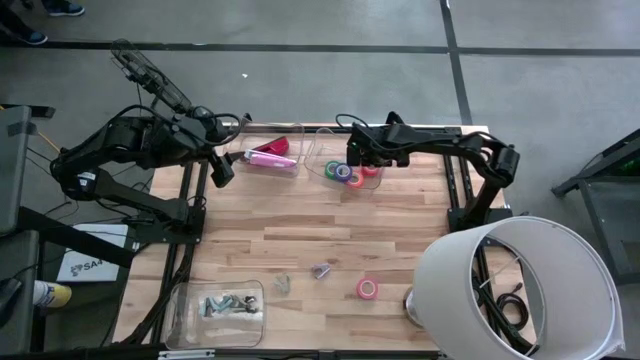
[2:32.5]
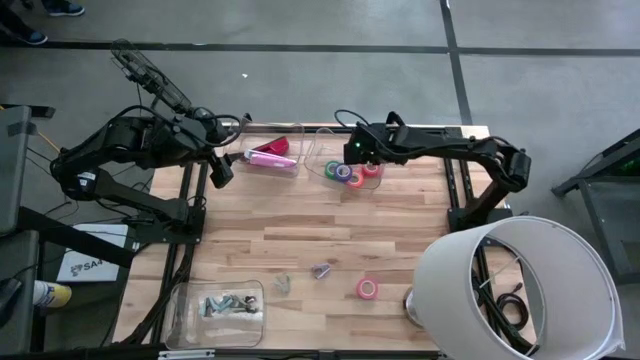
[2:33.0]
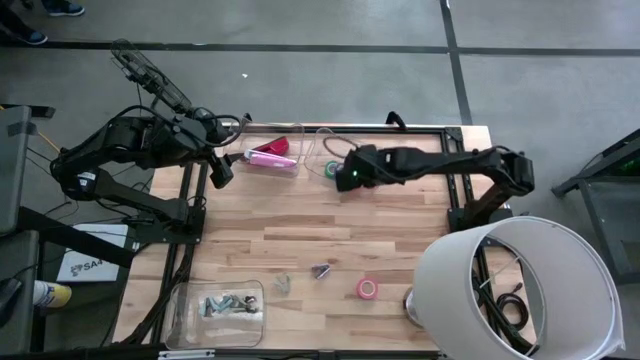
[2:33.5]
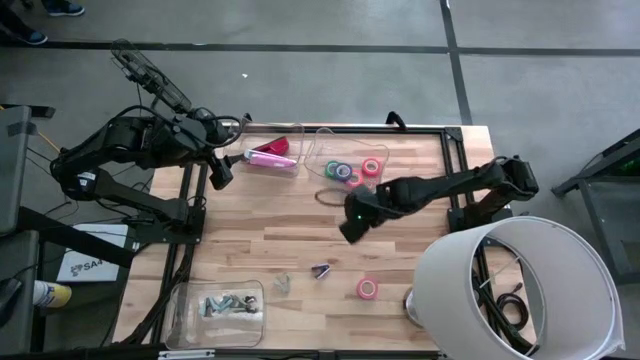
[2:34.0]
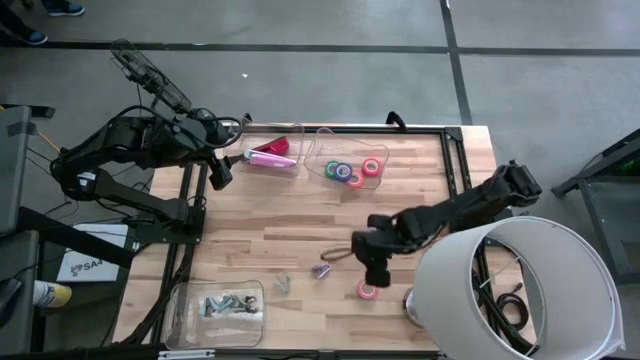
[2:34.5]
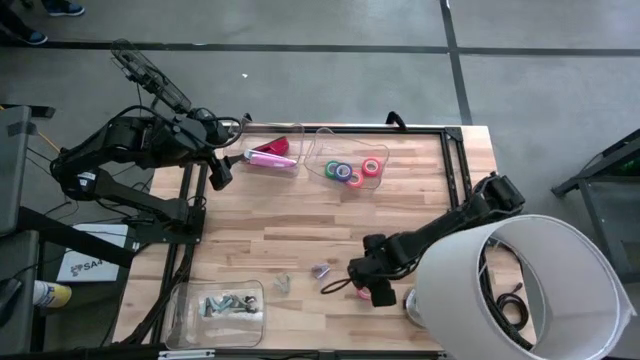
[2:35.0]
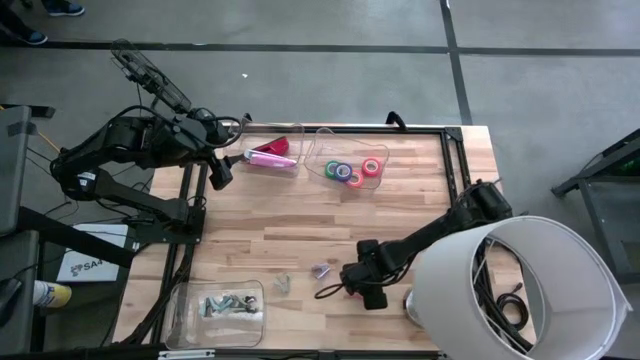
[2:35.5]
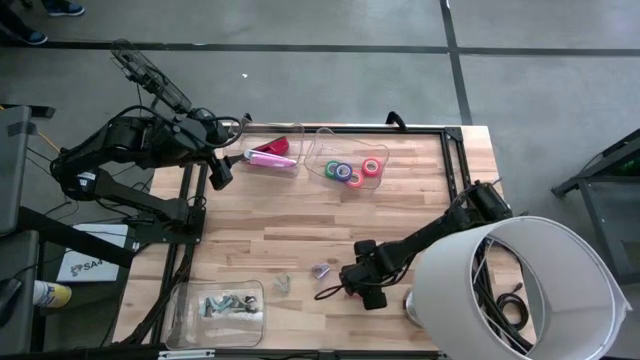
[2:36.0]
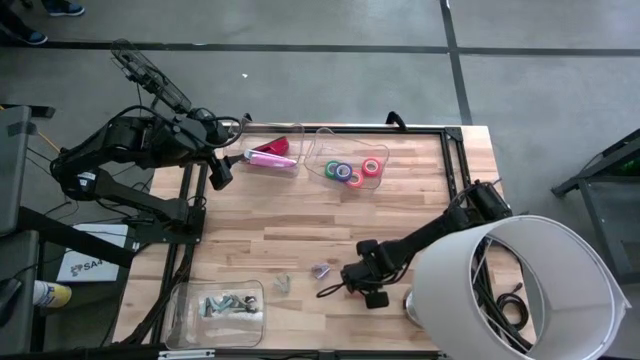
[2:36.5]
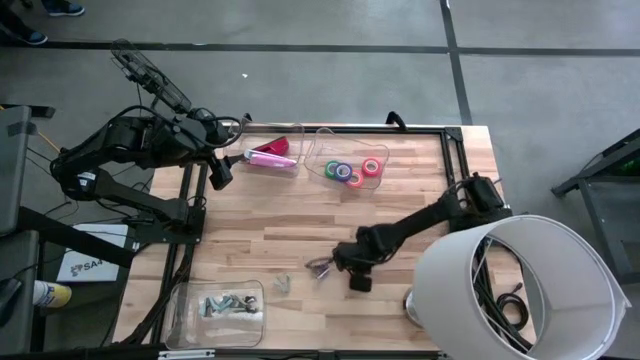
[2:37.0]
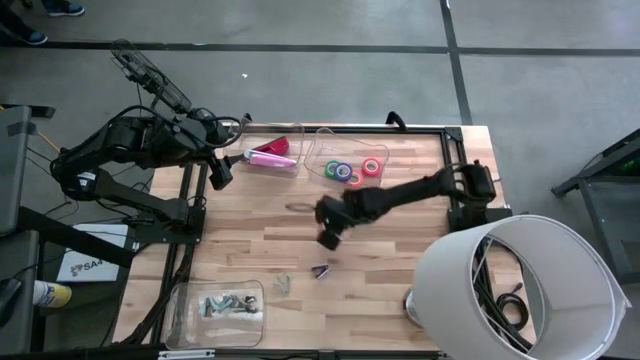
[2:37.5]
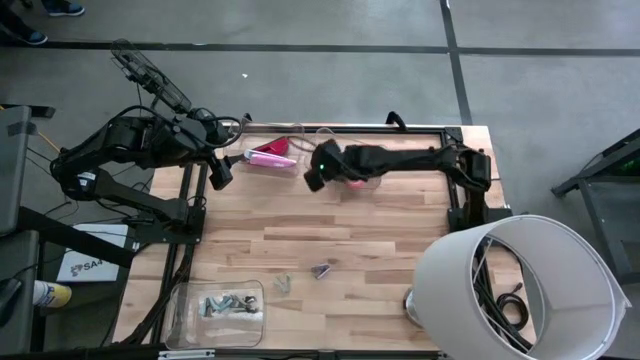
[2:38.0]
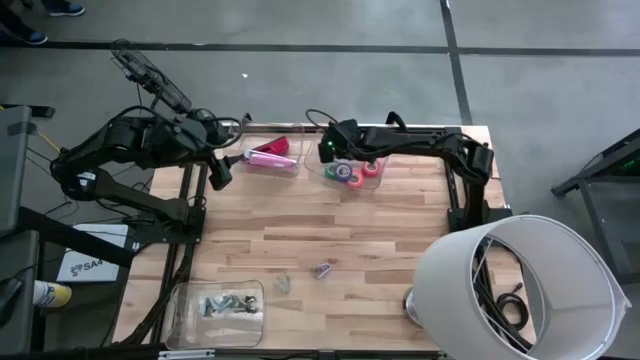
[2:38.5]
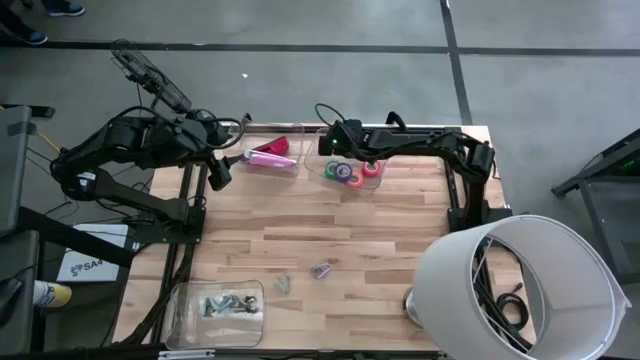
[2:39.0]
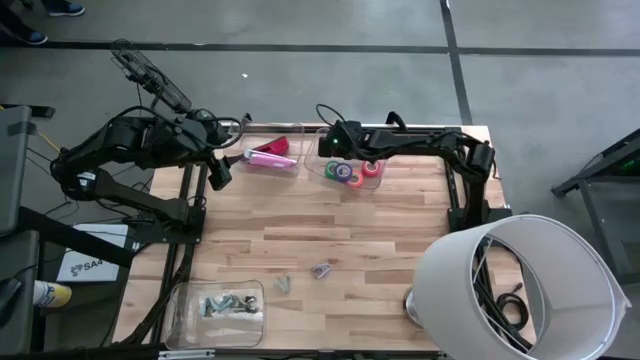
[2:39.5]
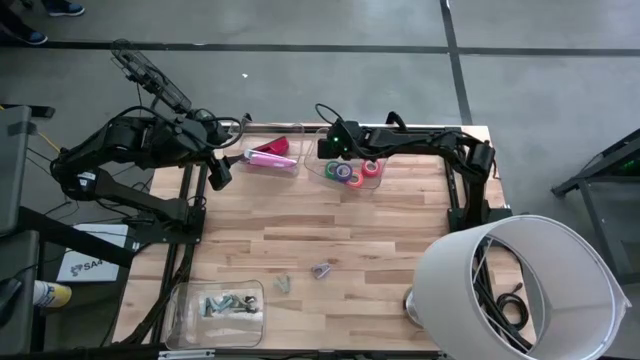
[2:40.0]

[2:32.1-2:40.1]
Task: Pick and place Stapler, Stapler remover, tape
Put the pink tape into the top right transparent bin

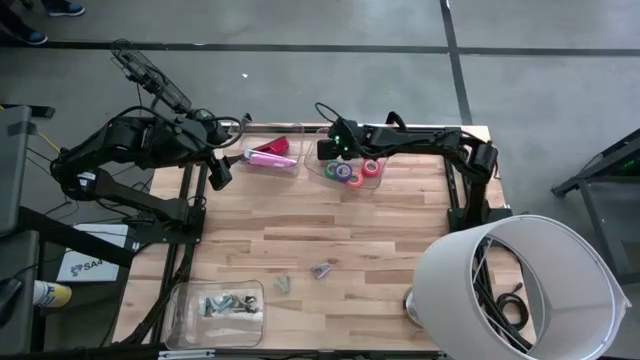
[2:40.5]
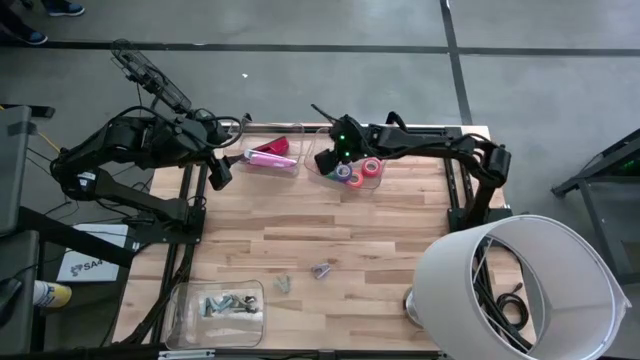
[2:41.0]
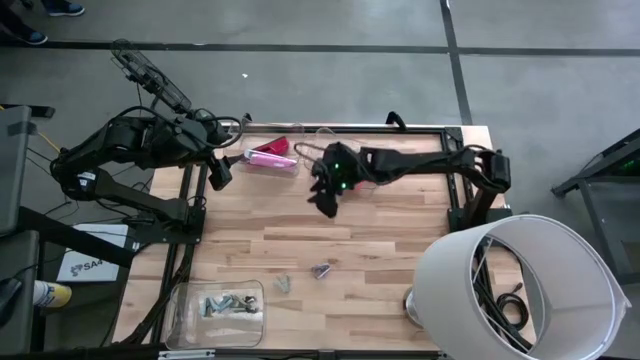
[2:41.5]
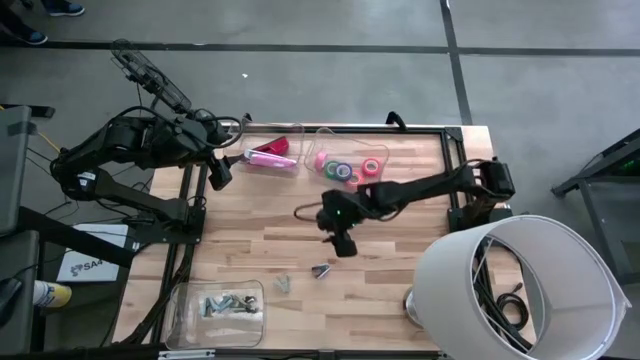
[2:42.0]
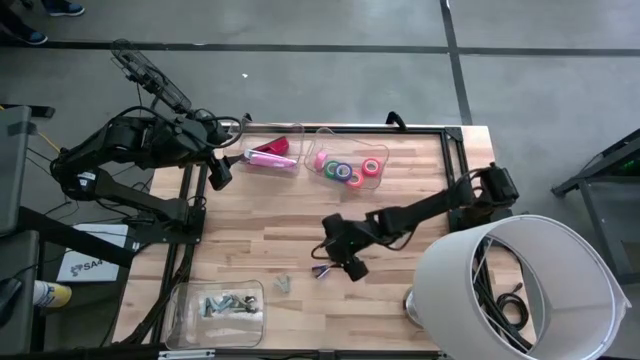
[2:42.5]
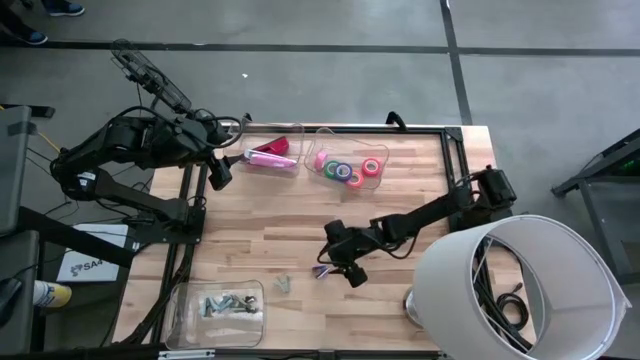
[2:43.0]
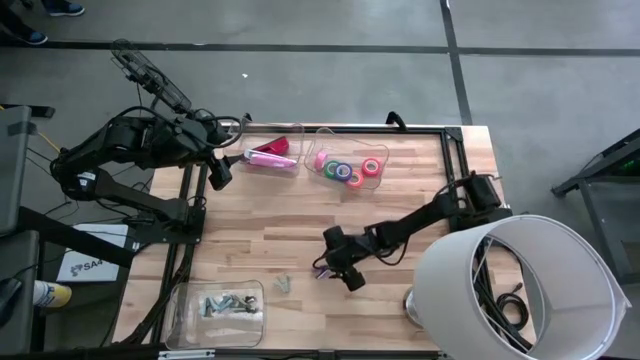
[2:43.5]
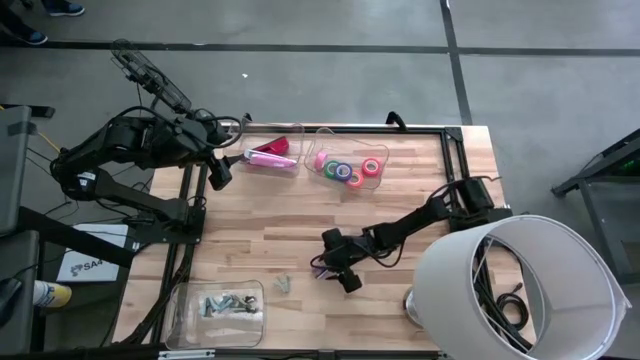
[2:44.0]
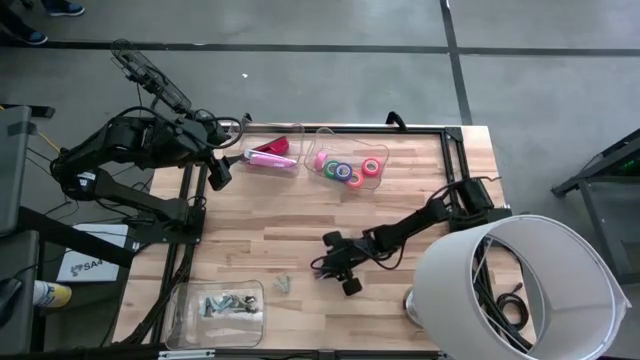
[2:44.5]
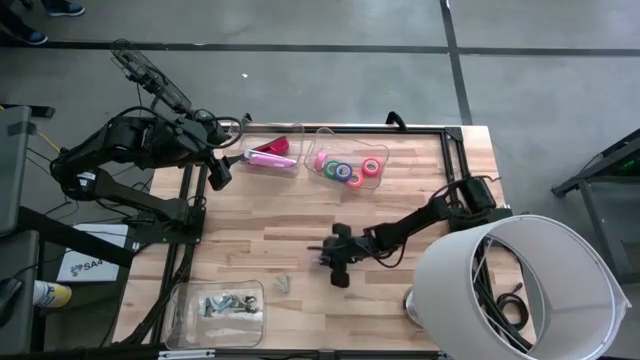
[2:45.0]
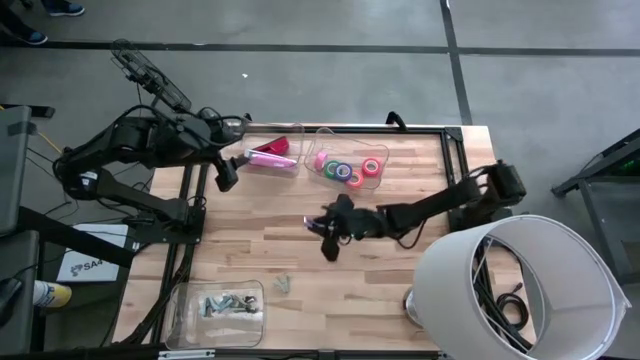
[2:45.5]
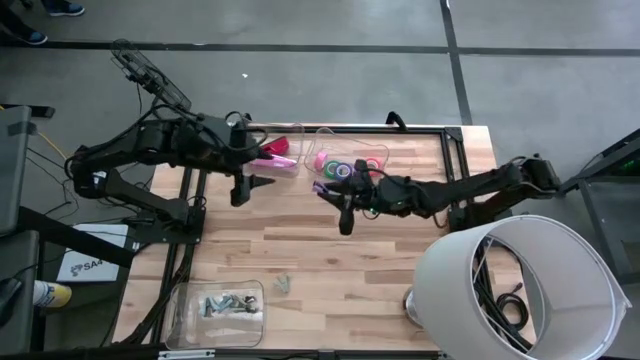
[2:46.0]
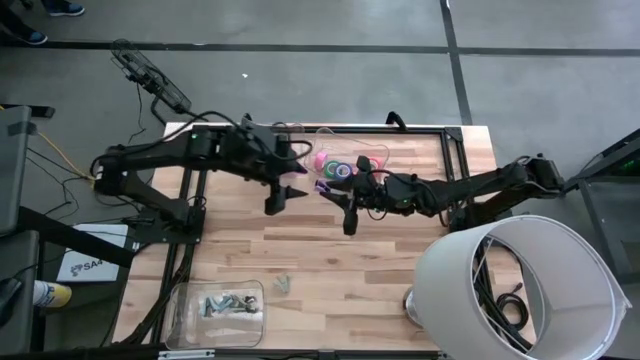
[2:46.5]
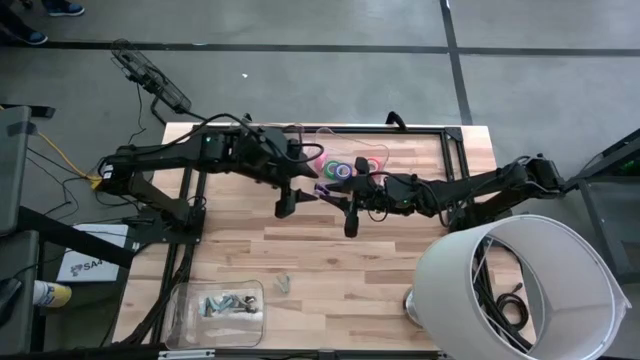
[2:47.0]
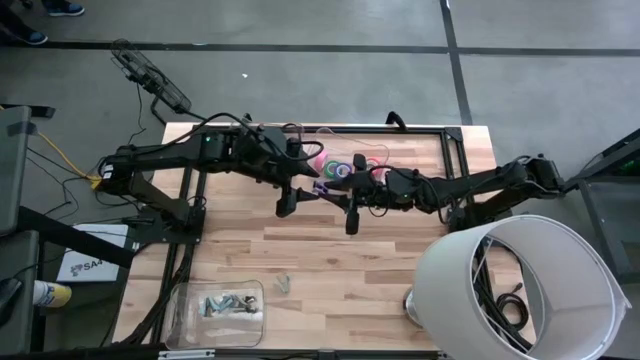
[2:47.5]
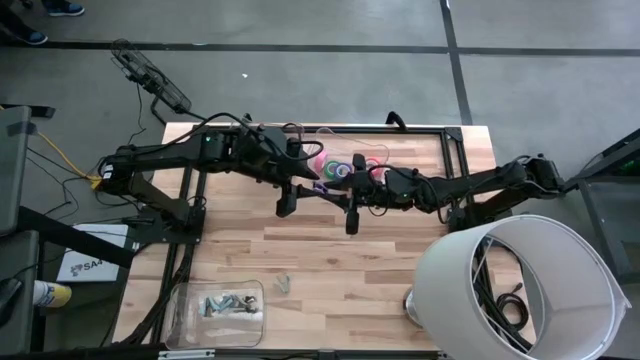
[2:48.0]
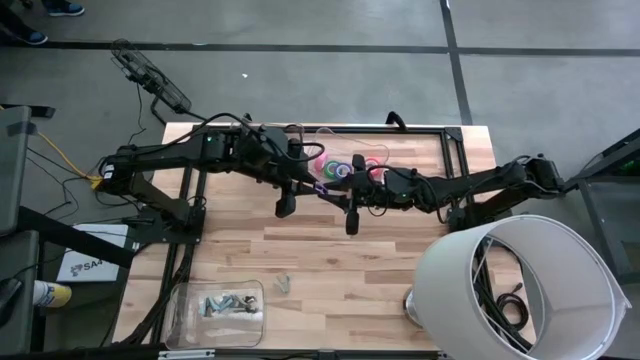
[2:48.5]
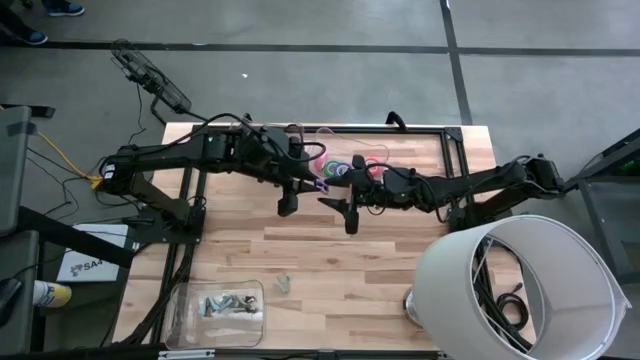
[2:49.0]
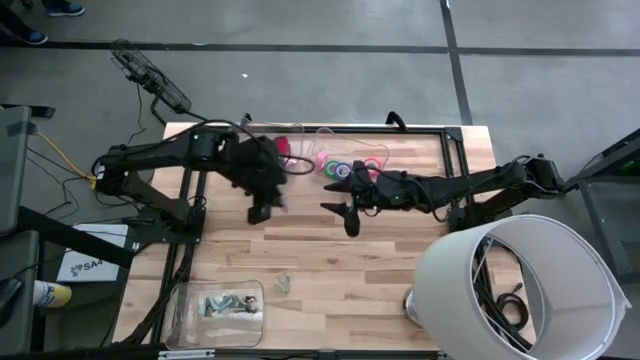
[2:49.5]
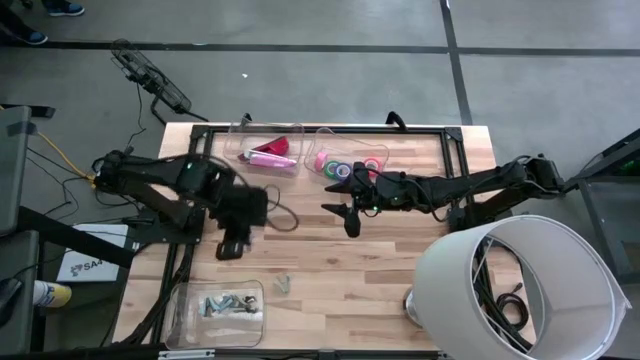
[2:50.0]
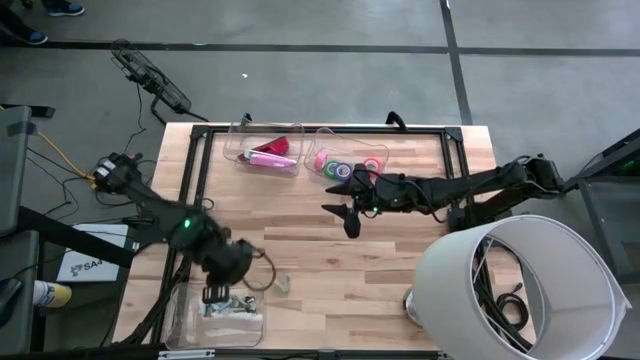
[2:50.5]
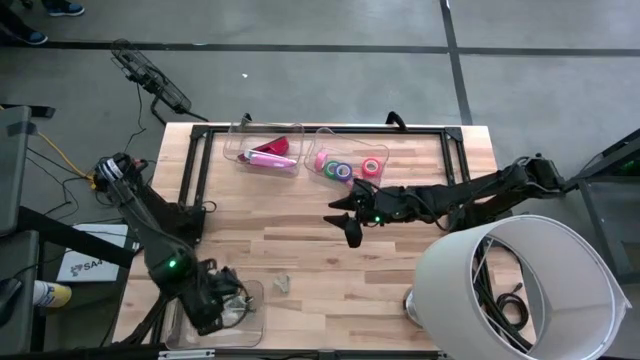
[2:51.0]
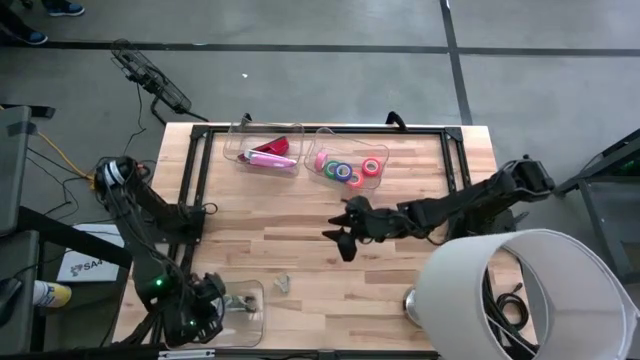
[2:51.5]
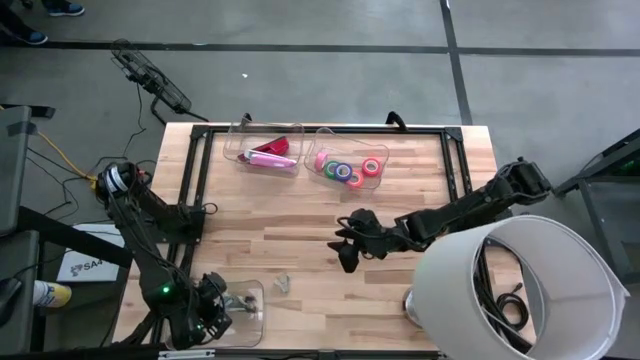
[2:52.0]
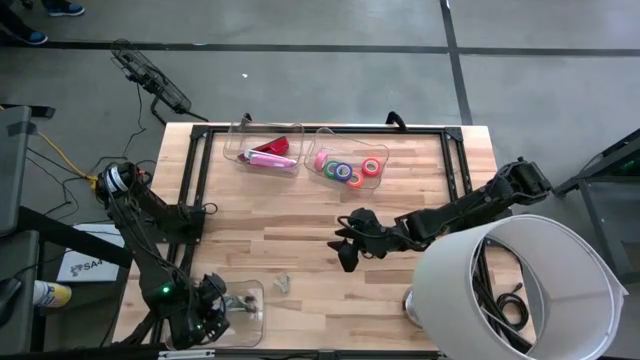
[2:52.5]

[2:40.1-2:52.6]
Put the purple stapler remover into the bottom transparent bin

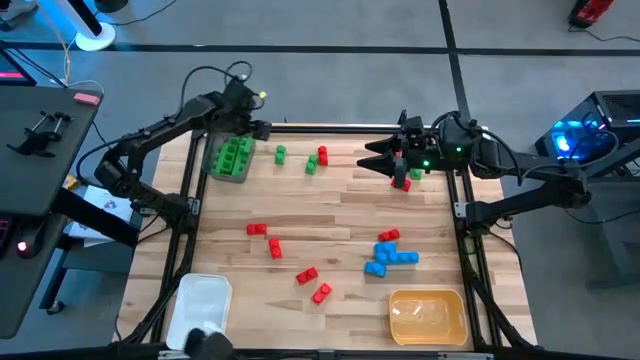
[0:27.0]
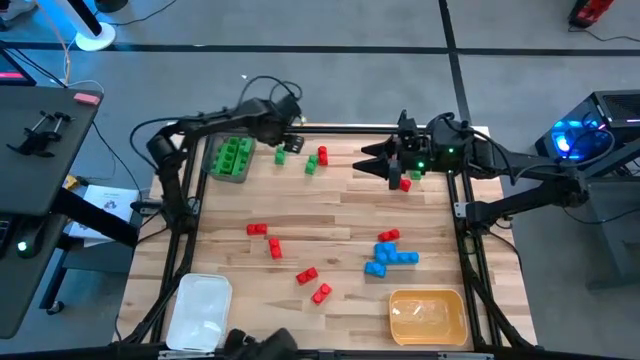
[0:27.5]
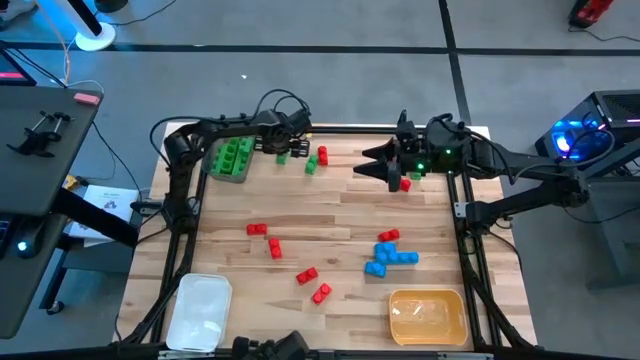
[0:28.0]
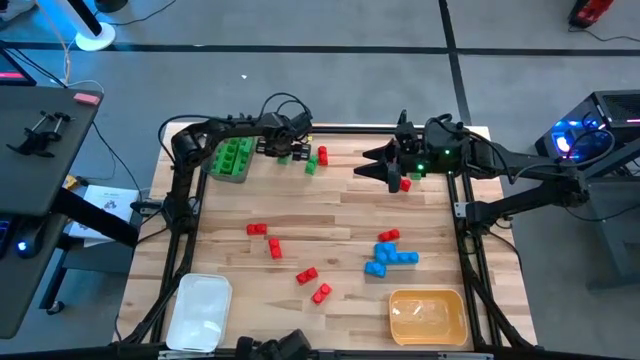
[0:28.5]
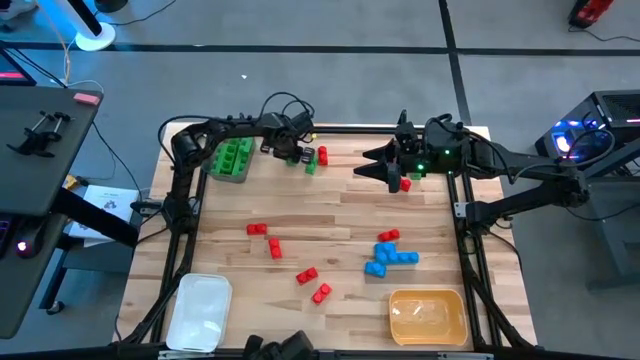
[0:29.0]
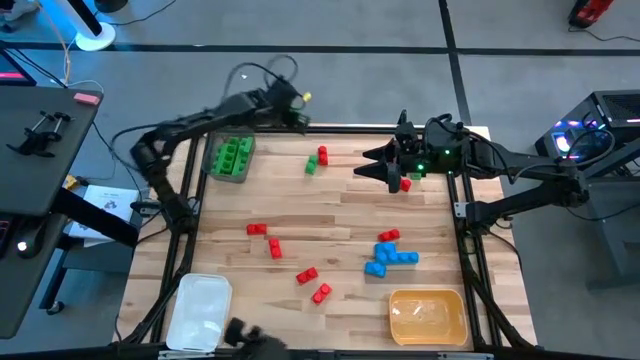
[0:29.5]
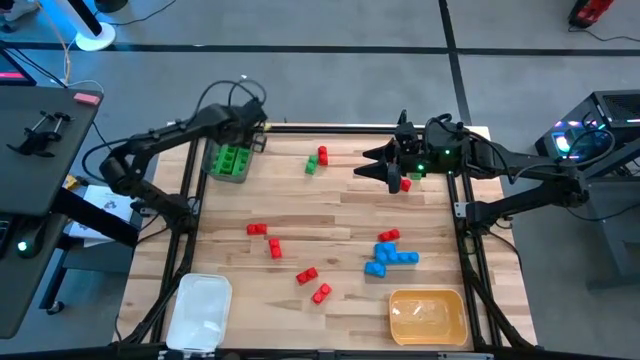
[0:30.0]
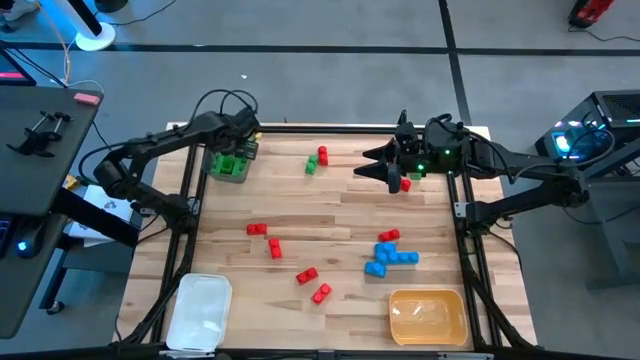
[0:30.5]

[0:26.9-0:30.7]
Task: Sort blocks
Put the green game piece into the black bin
